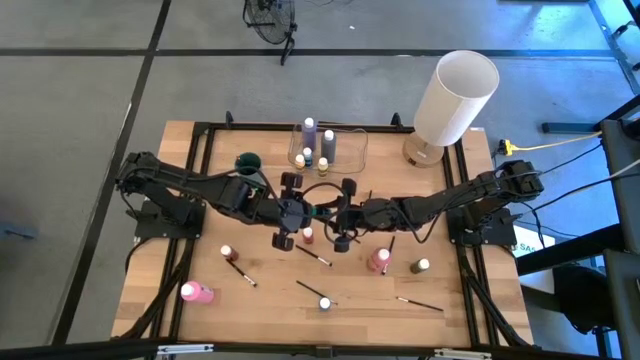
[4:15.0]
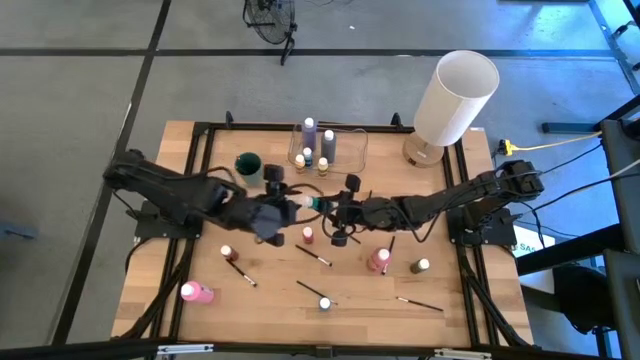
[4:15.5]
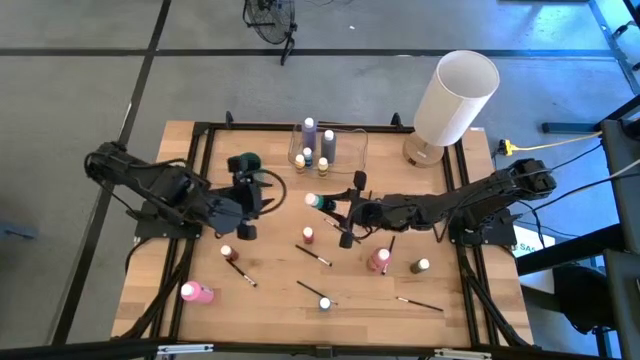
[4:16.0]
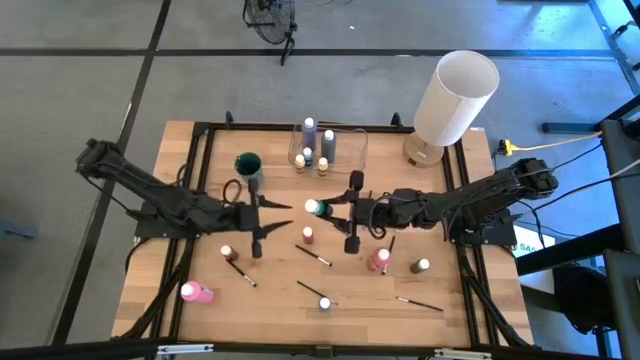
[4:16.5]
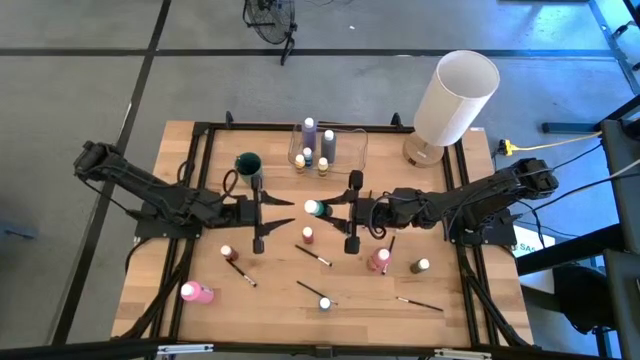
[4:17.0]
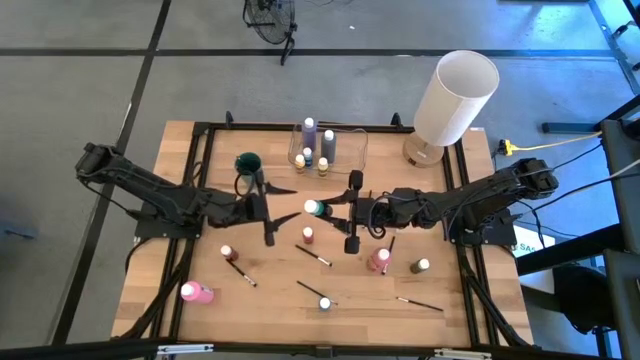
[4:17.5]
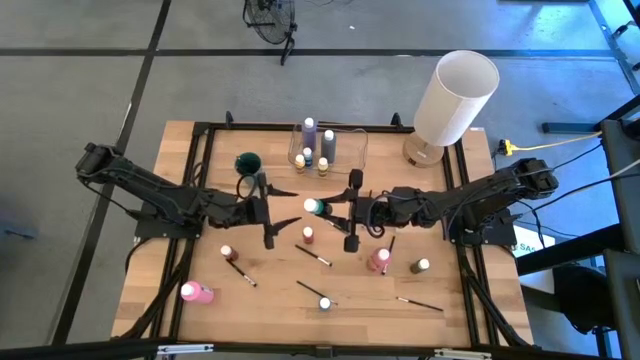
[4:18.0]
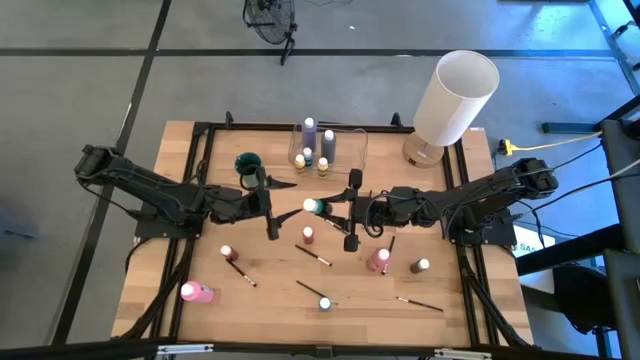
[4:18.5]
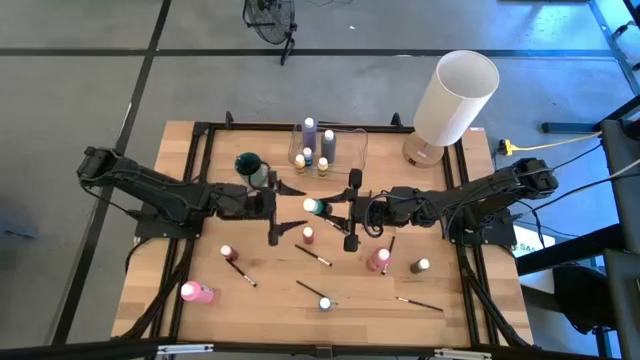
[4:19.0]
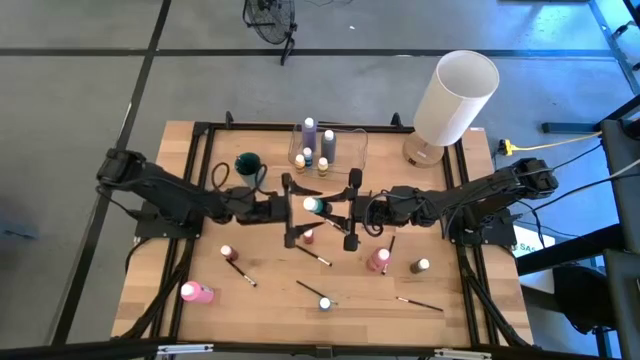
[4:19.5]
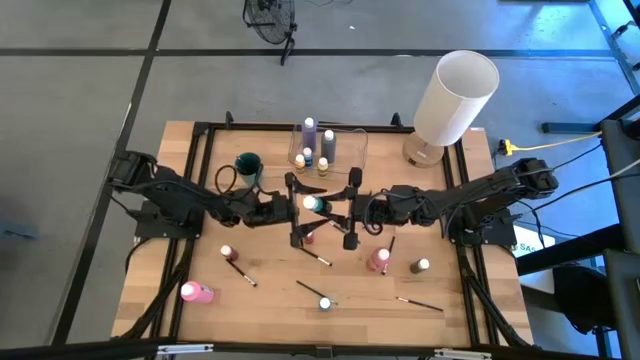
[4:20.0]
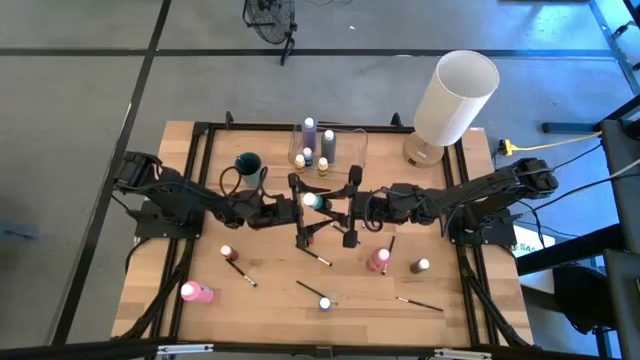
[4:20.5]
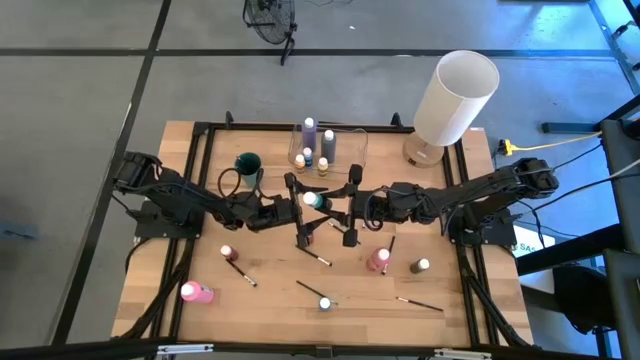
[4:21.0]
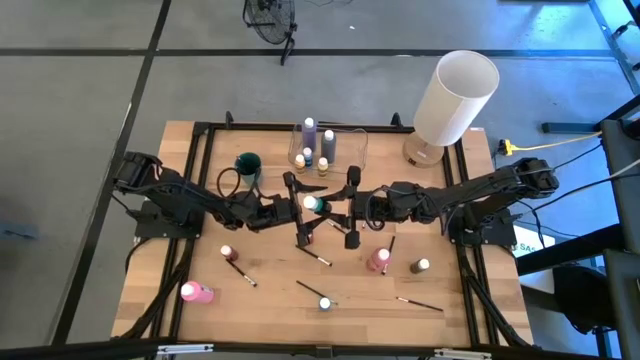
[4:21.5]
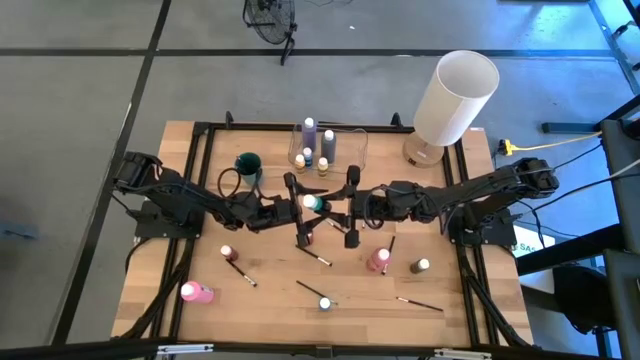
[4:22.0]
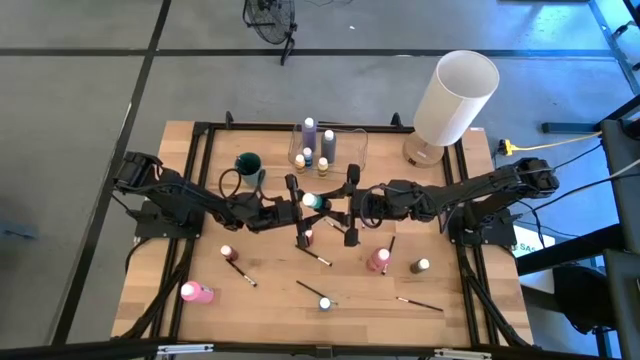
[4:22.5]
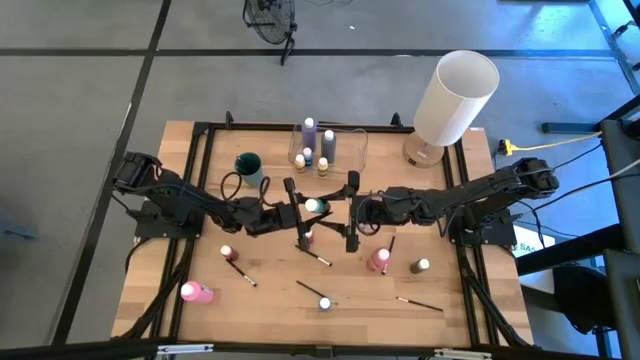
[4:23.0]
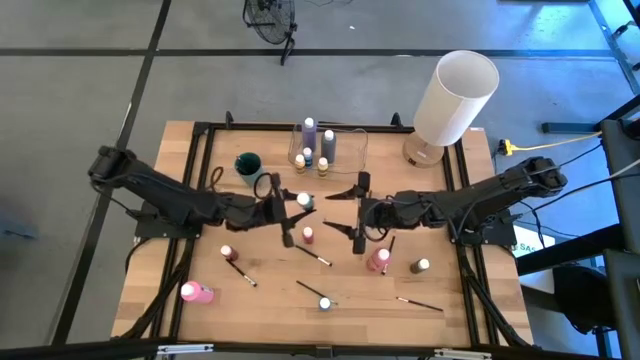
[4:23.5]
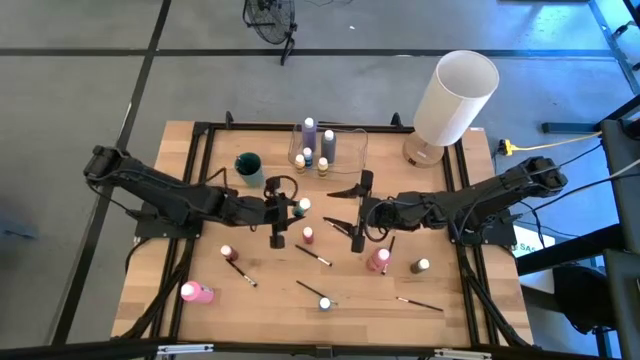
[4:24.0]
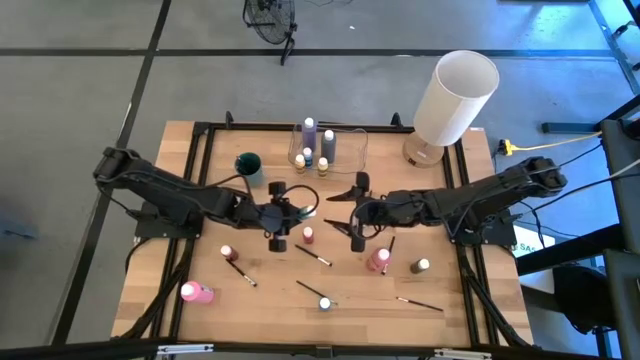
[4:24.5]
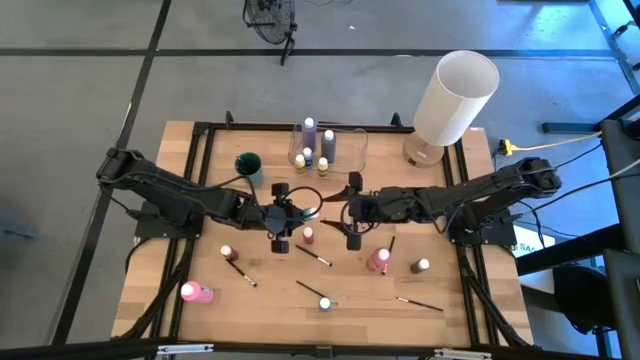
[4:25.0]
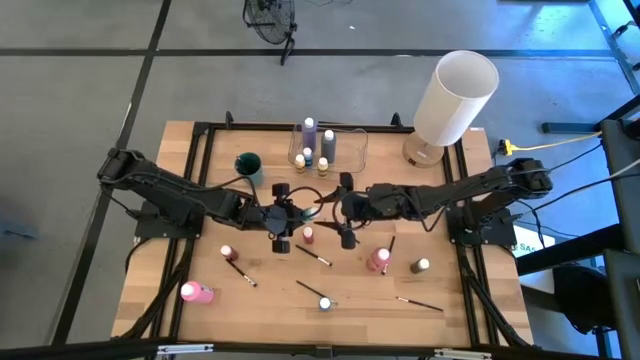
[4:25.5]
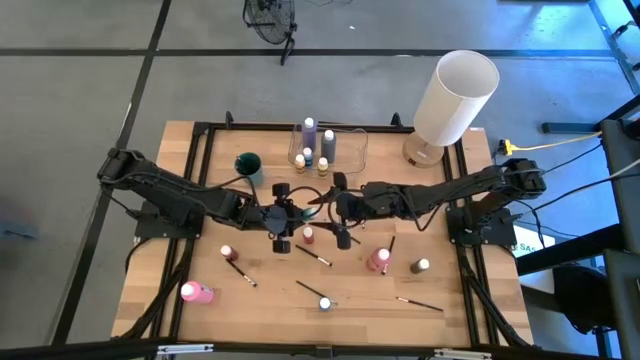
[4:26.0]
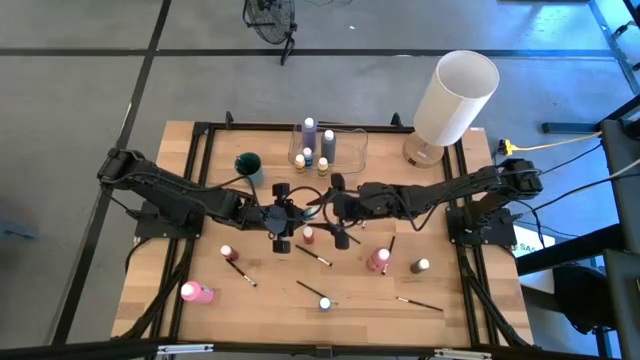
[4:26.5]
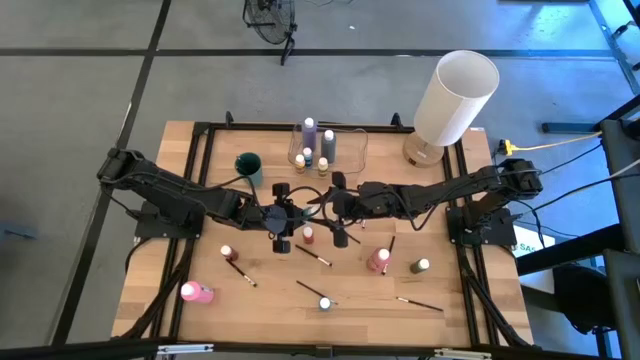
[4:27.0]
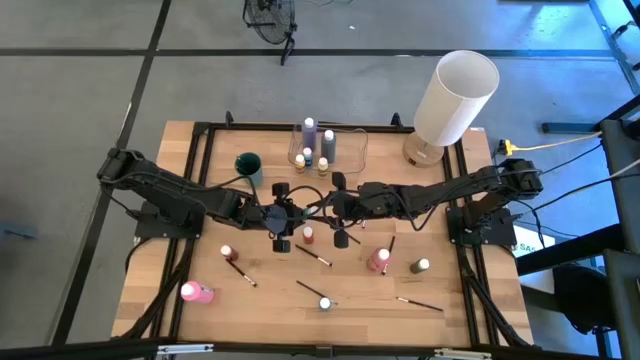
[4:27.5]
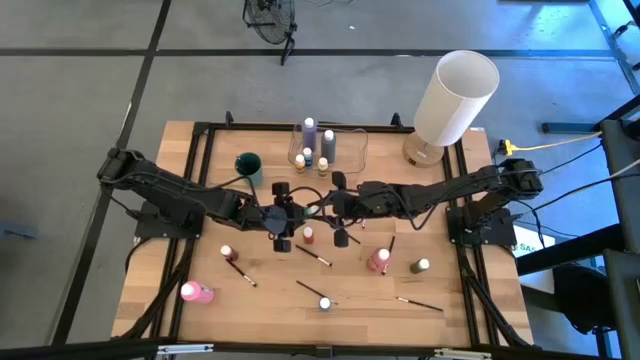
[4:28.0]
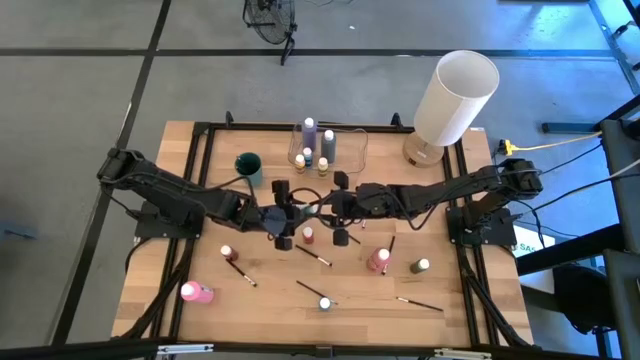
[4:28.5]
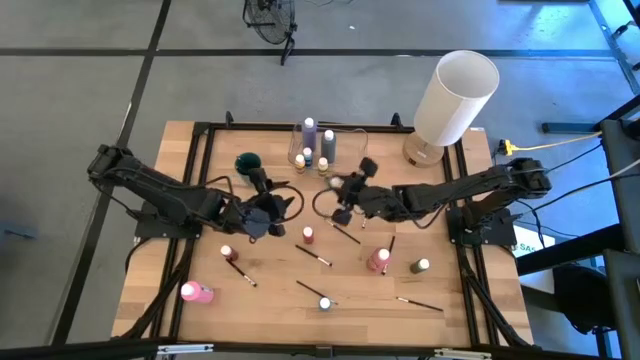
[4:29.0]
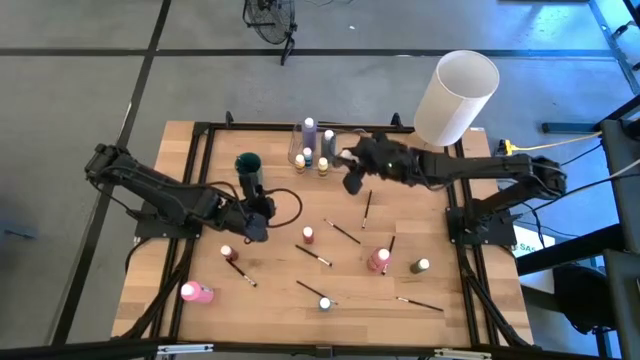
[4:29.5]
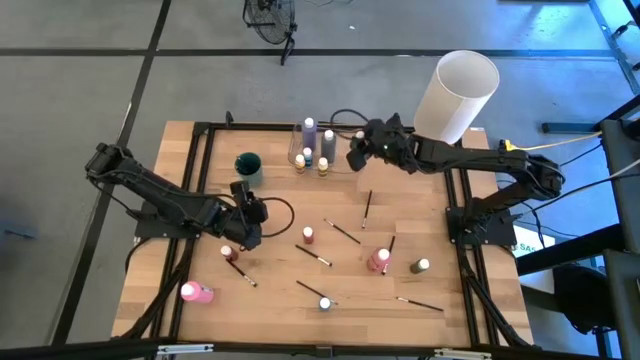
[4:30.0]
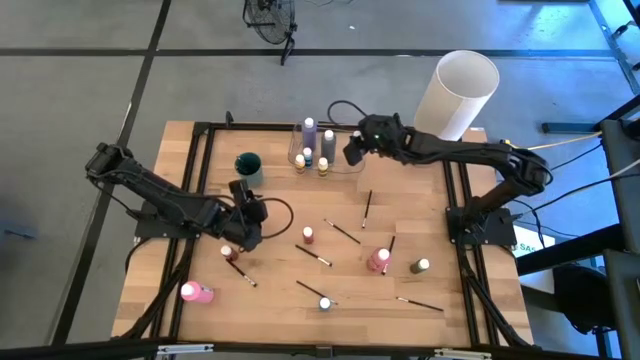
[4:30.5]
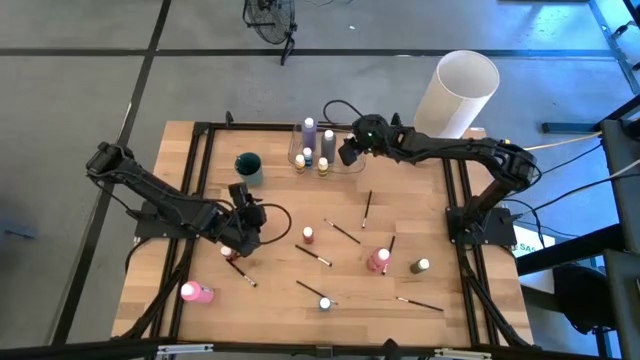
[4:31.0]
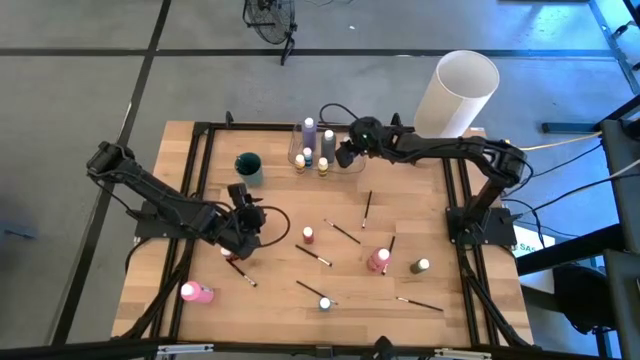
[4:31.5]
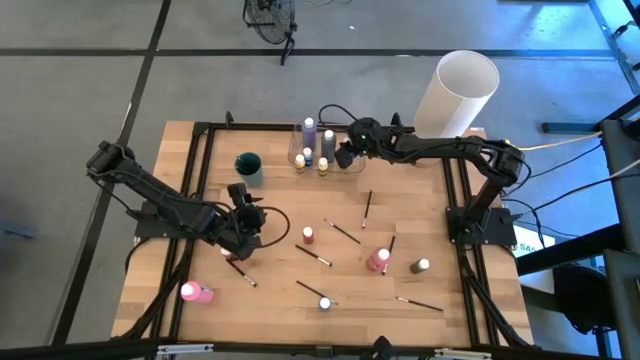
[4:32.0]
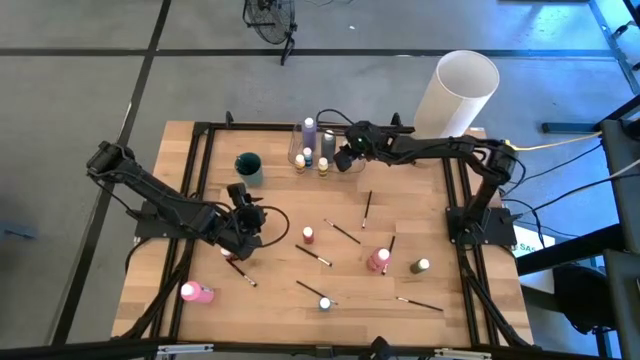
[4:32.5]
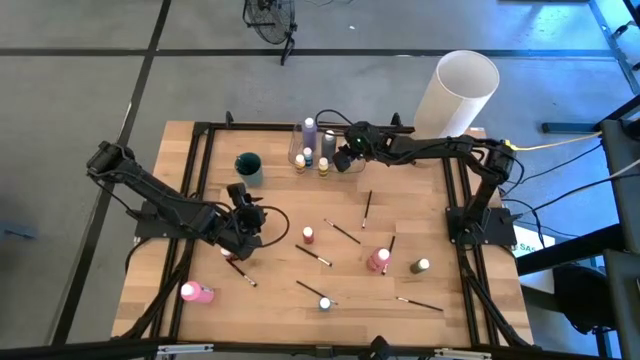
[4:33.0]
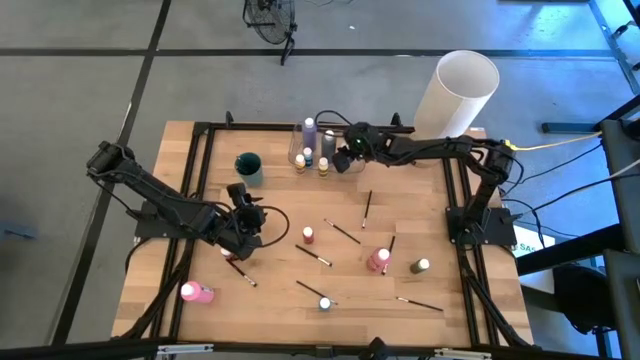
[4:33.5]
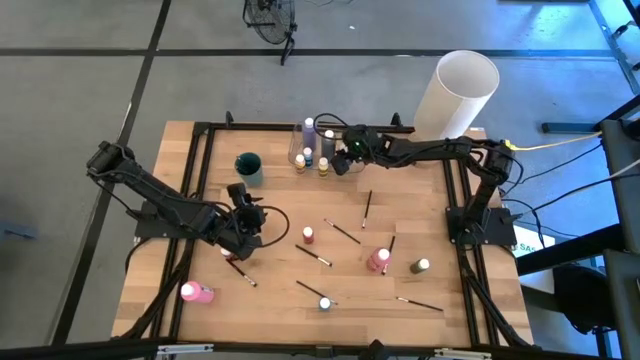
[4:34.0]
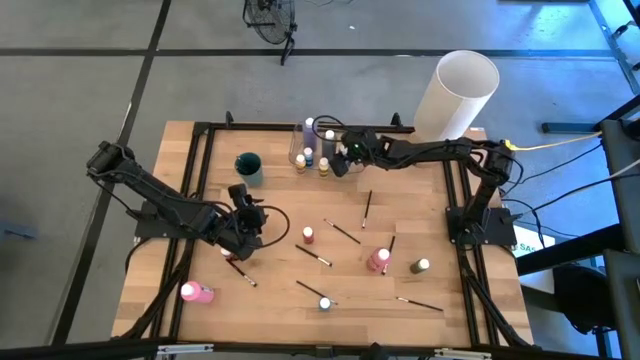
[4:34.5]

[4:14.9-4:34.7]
Task: Pick & Place Paint Supplies
Put the green paint bottle into the transparent bin

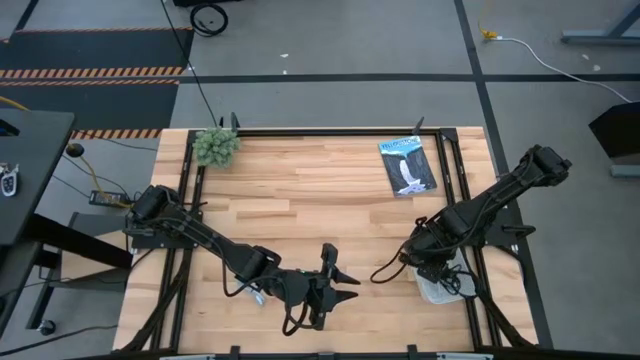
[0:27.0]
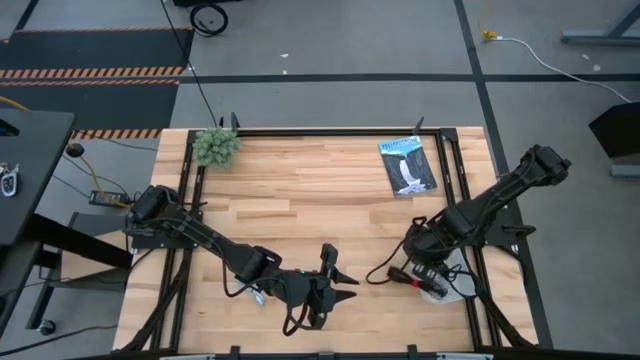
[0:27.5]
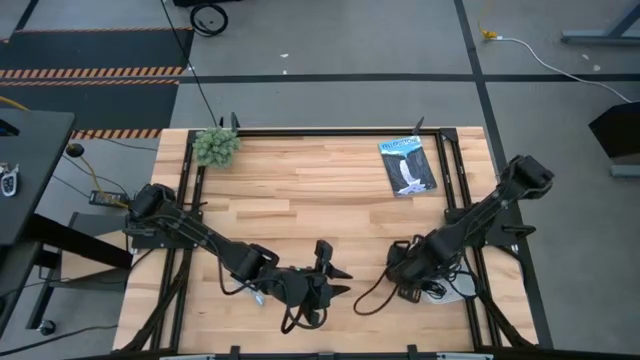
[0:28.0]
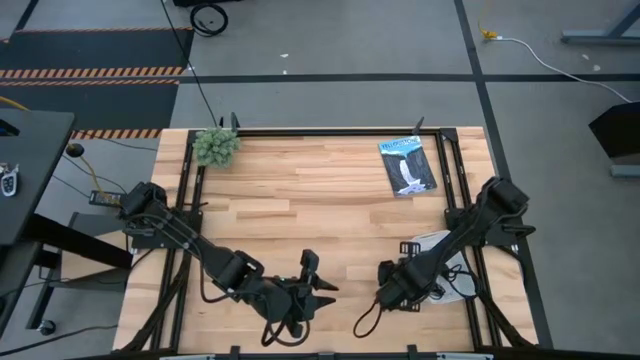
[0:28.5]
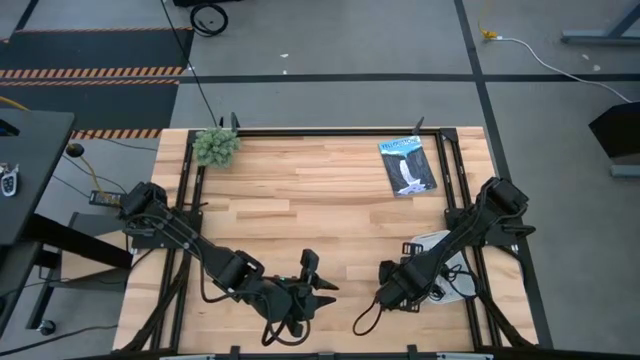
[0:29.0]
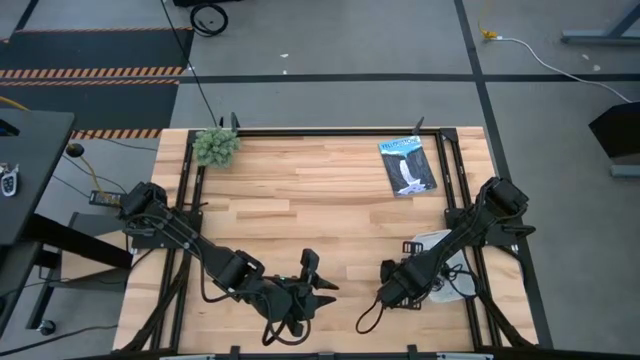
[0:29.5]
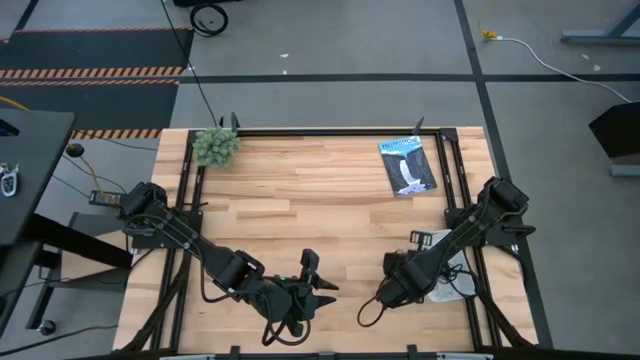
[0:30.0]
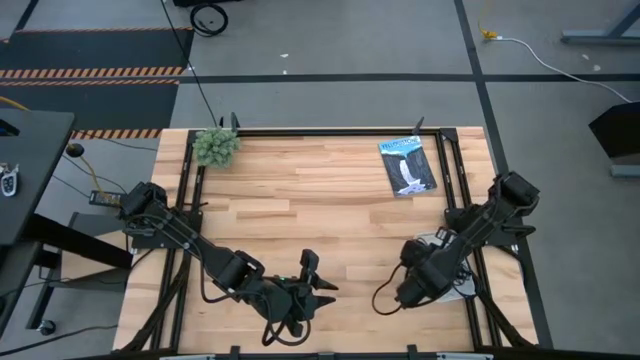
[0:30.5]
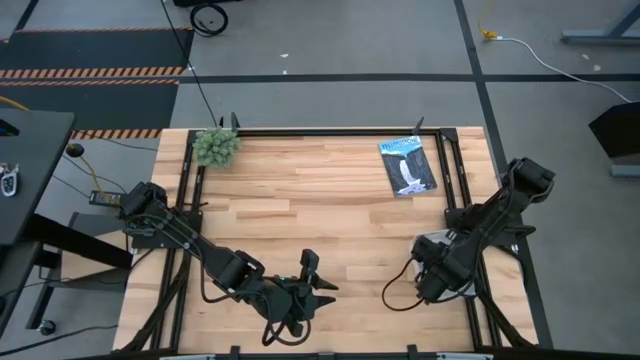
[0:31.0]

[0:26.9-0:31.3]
Task: Pick and place USB-C Cables
Put the black charger cable into the white container
